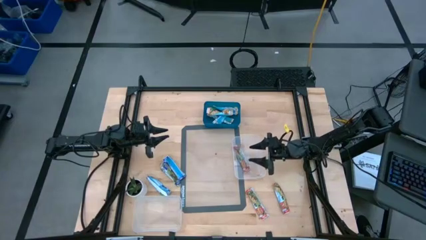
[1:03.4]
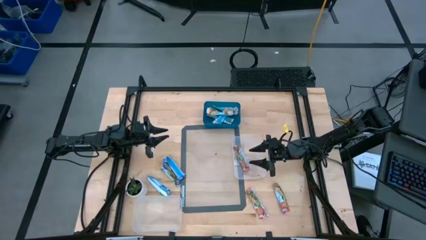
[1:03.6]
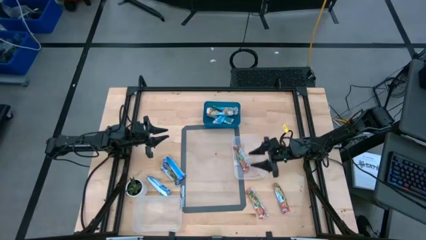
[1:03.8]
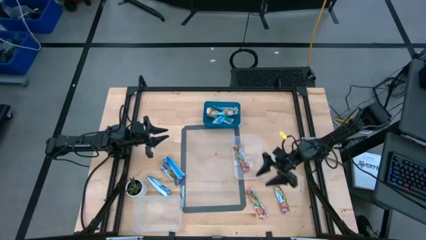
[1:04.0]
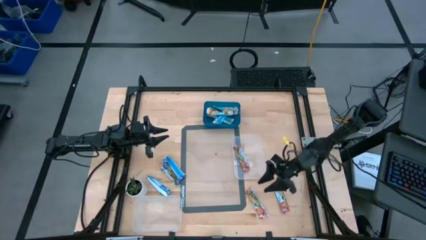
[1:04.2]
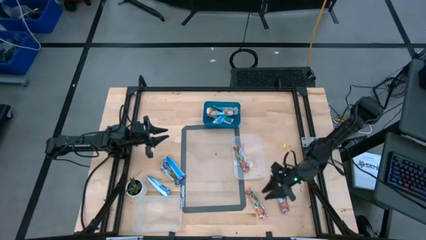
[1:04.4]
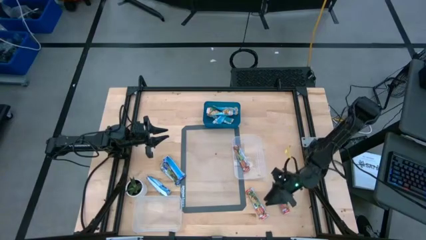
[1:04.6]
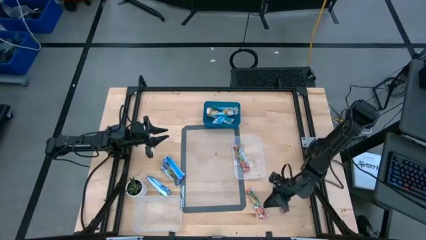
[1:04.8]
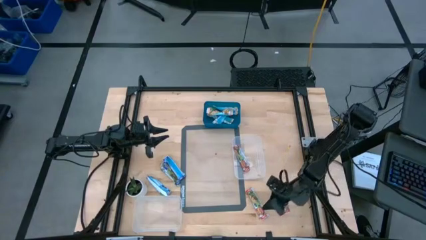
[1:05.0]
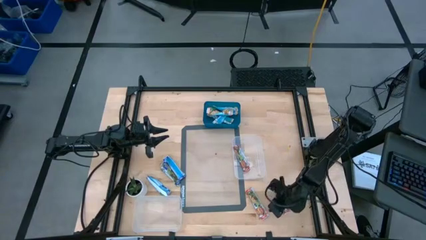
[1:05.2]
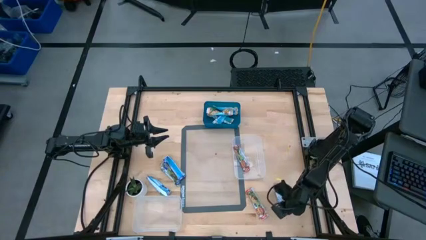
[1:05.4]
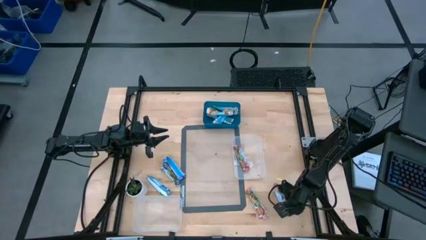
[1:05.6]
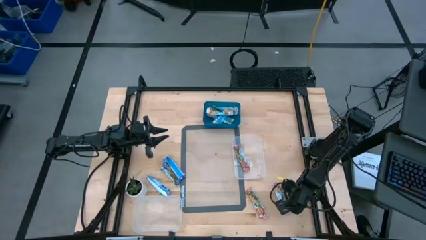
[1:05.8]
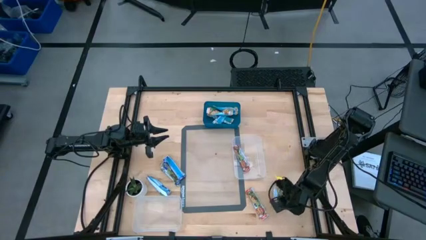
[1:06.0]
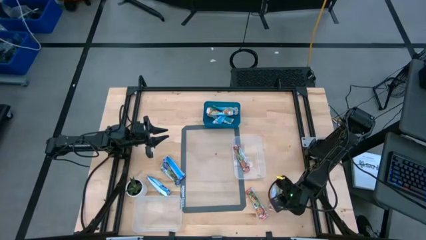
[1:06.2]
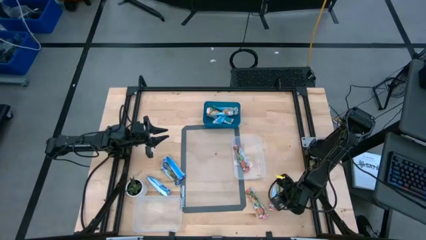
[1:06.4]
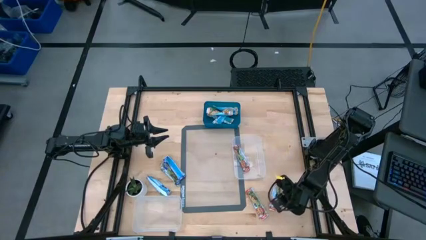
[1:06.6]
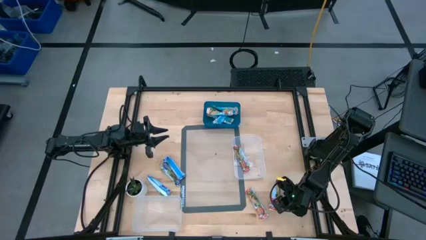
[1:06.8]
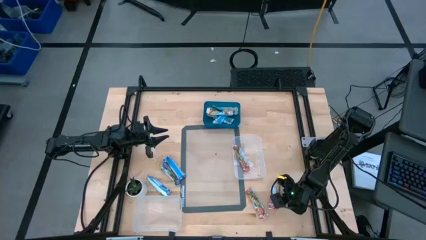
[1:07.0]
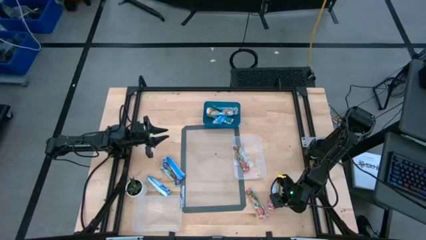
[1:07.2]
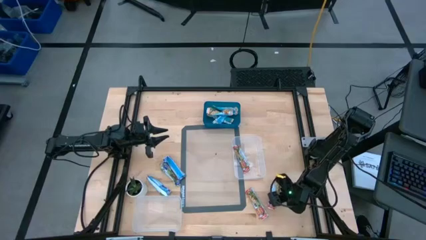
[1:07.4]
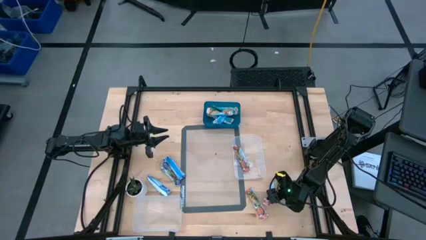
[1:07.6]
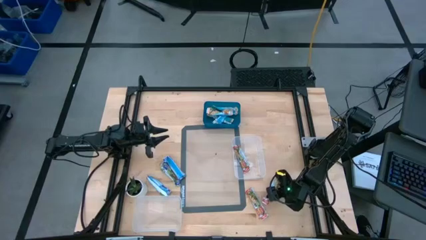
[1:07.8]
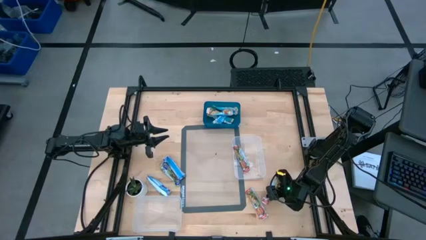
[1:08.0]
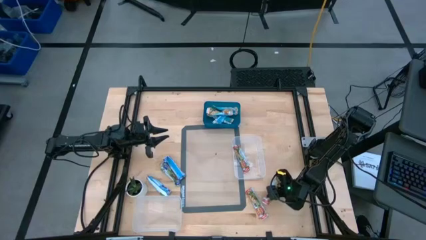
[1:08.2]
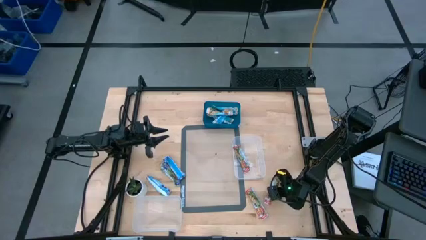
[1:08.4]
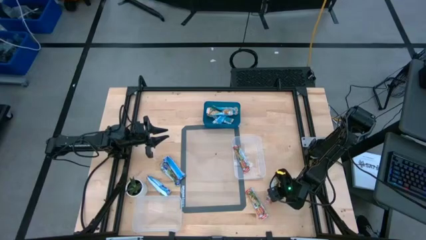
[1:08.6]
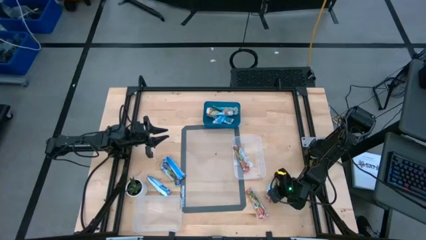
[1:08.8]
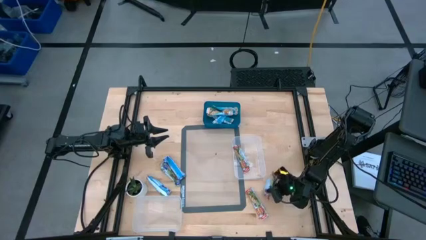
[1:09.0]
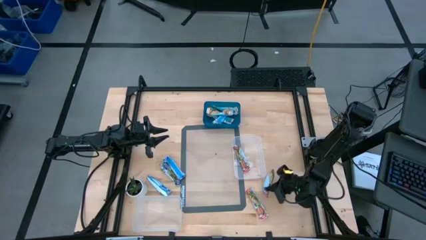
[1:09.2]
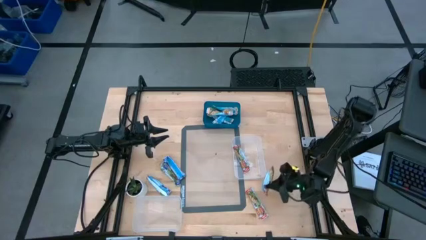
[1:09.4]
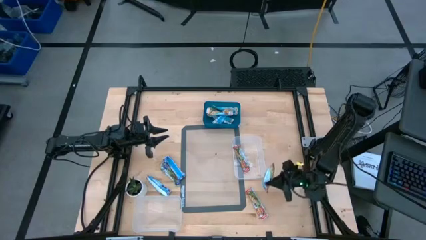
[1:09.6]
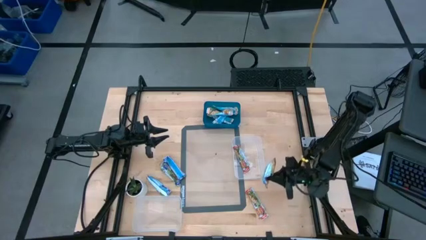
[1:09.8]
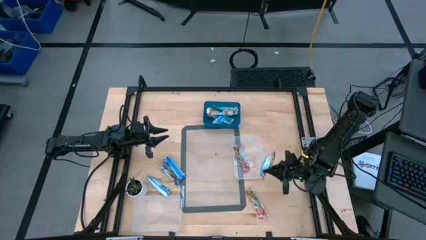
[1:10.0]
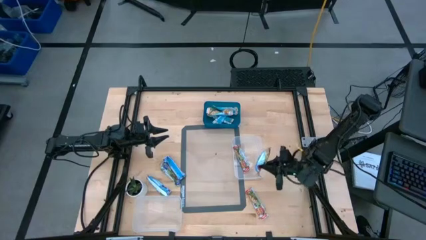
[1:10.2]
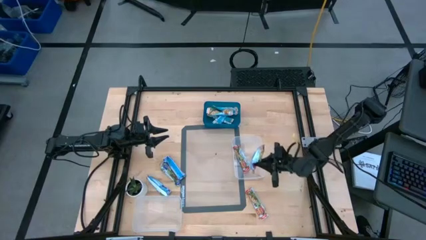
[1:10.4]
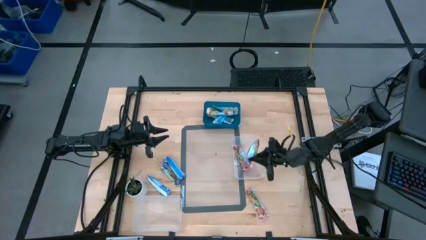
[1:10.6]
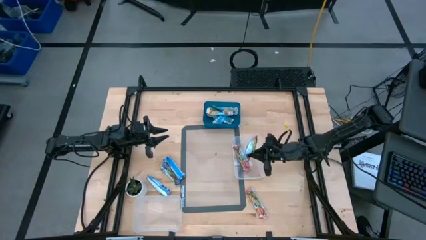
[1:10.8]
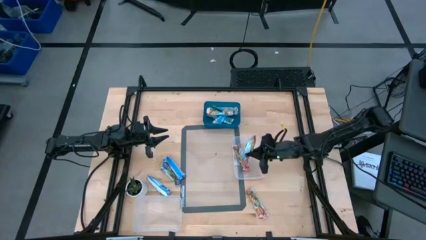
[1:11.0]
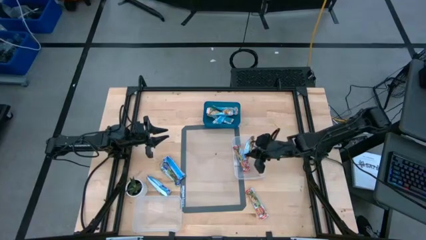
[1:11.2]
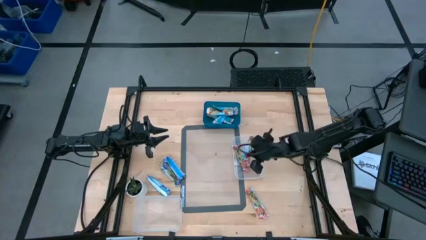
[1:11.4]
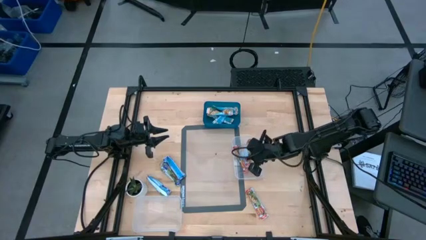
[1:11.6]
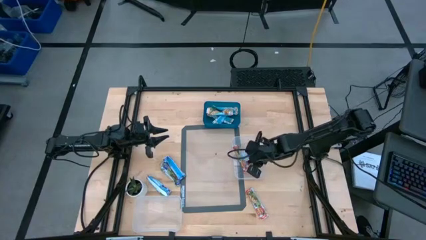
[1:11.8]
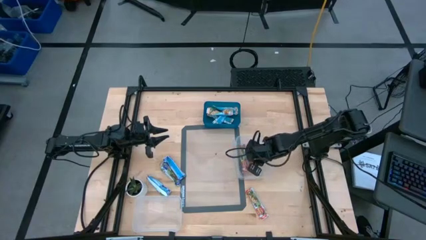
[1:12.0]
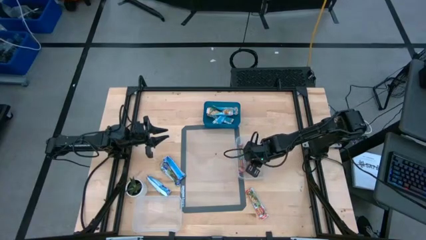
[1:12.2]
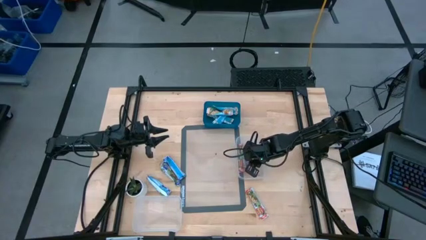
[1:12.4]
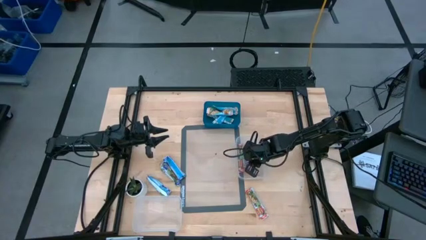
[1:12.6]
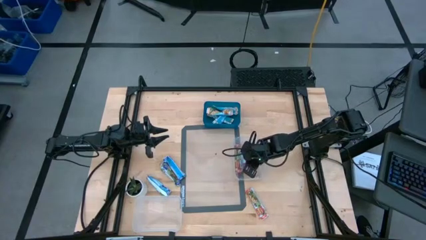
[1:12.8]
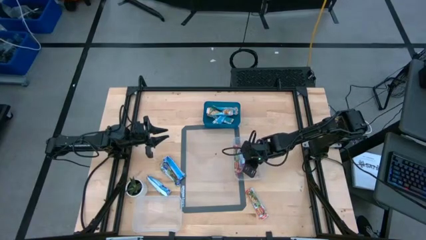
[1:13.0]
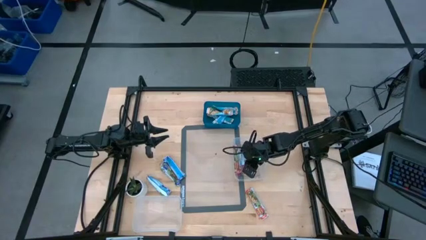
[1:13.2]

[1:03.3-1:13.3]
Task: Pick and place Granola Bars by type
Put the red granola bar into the right transparent bin

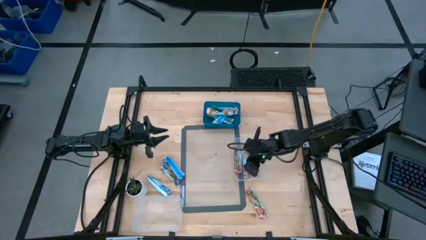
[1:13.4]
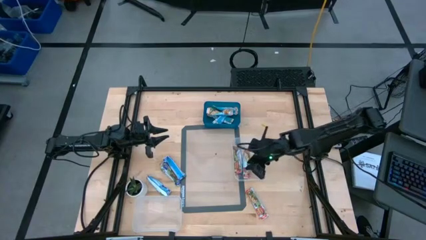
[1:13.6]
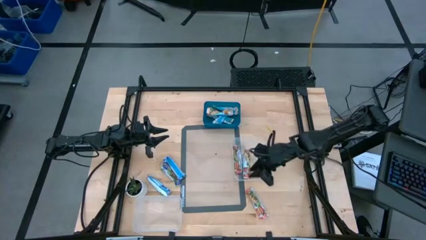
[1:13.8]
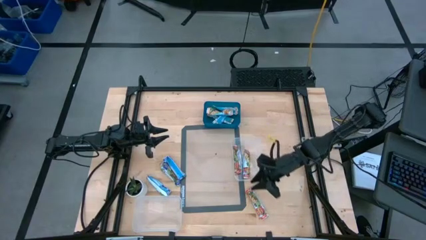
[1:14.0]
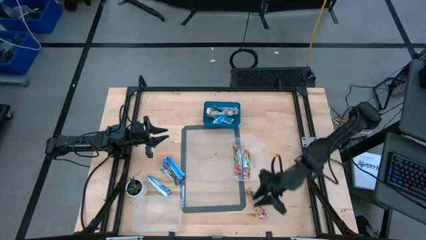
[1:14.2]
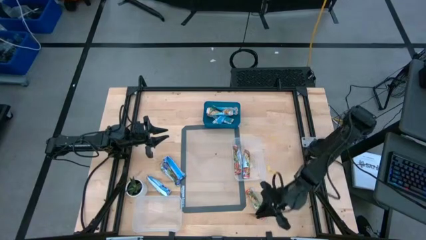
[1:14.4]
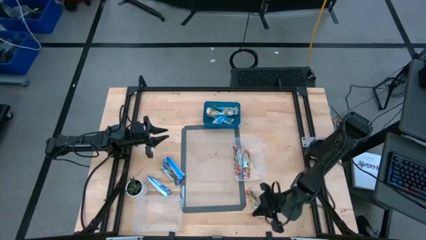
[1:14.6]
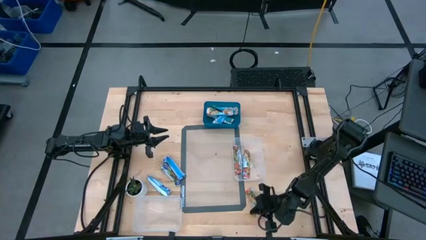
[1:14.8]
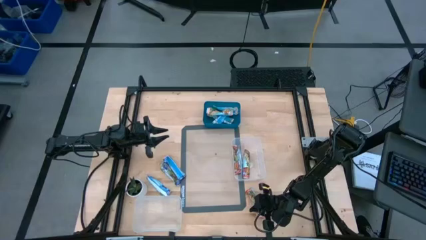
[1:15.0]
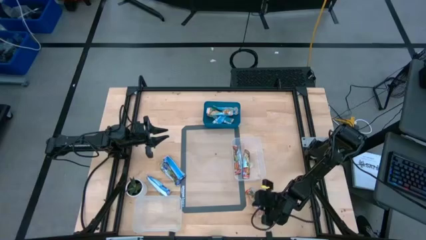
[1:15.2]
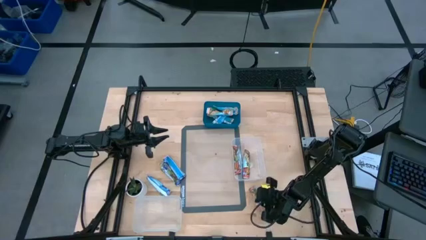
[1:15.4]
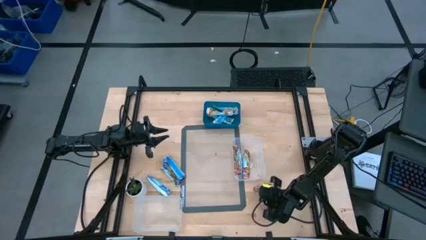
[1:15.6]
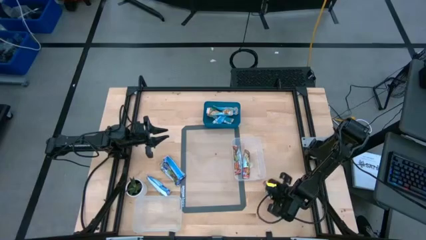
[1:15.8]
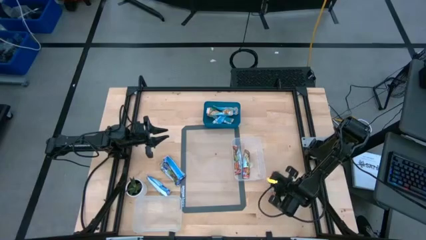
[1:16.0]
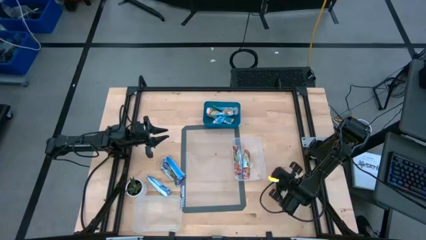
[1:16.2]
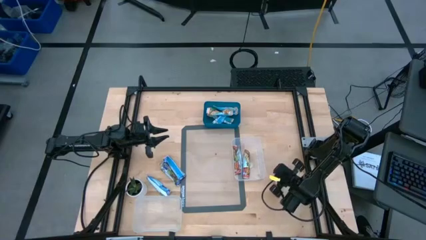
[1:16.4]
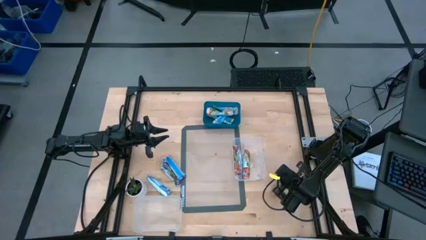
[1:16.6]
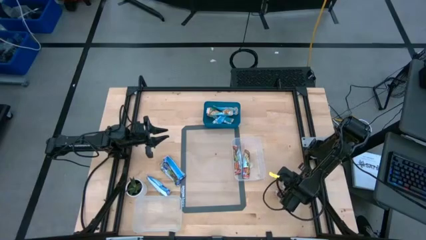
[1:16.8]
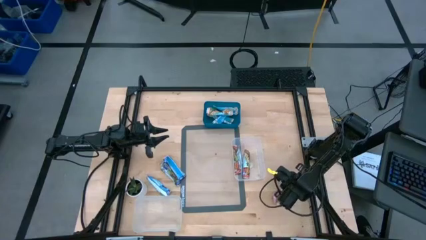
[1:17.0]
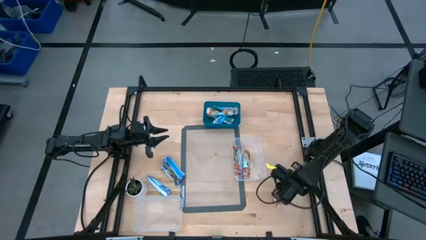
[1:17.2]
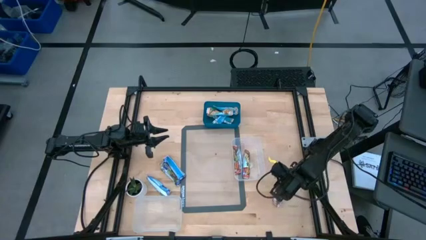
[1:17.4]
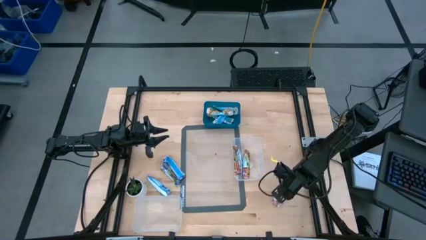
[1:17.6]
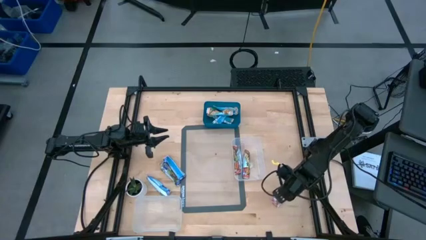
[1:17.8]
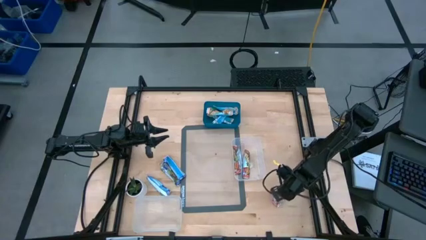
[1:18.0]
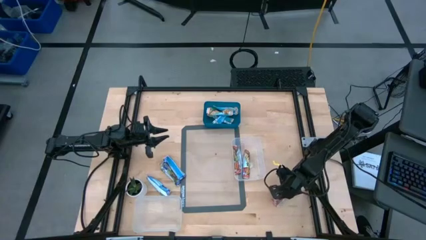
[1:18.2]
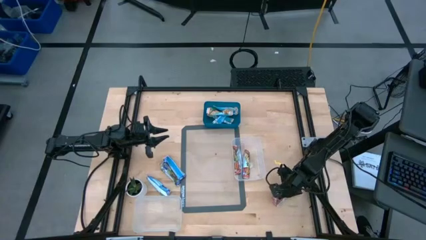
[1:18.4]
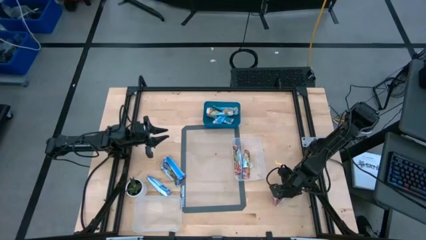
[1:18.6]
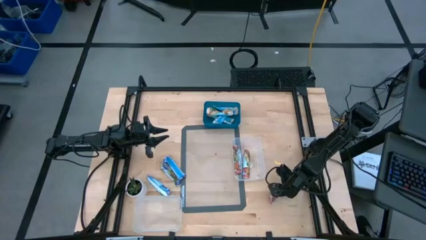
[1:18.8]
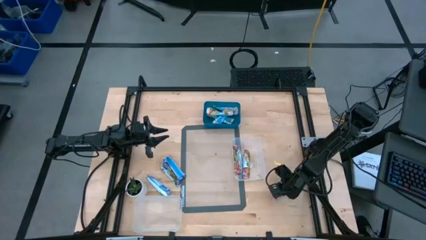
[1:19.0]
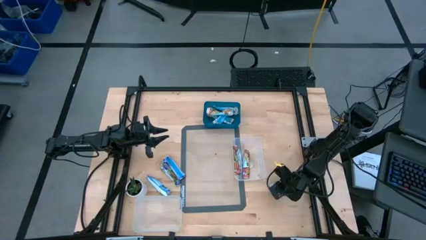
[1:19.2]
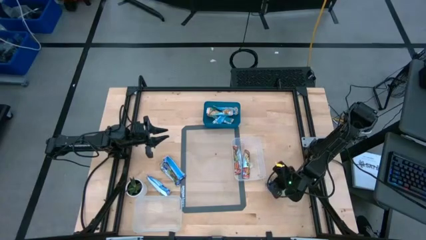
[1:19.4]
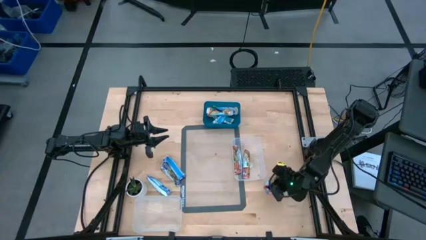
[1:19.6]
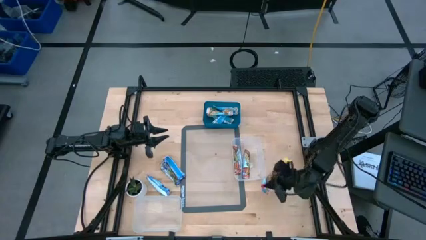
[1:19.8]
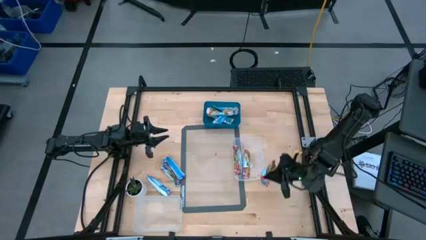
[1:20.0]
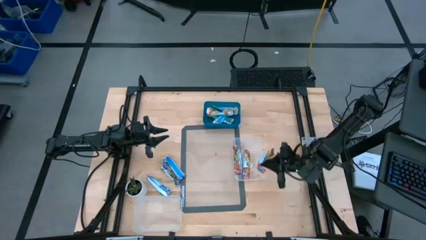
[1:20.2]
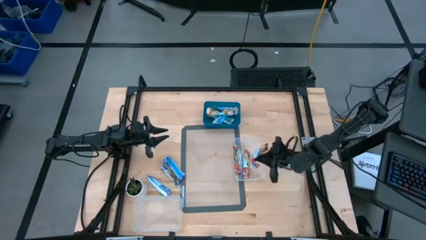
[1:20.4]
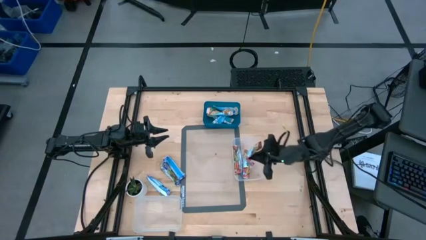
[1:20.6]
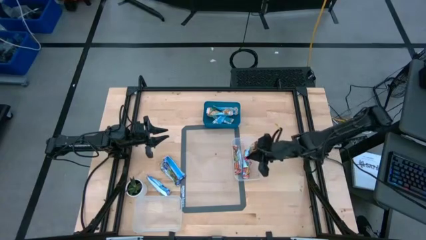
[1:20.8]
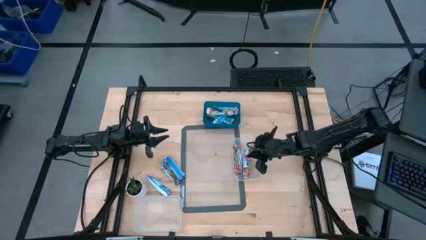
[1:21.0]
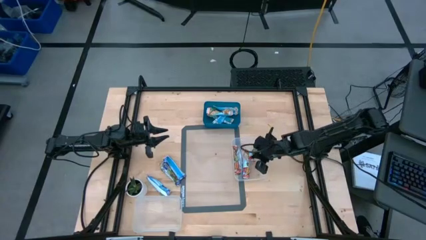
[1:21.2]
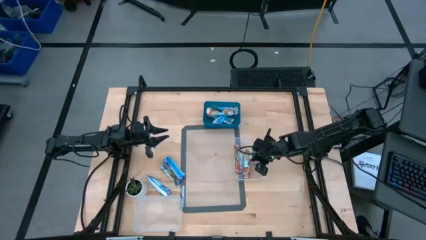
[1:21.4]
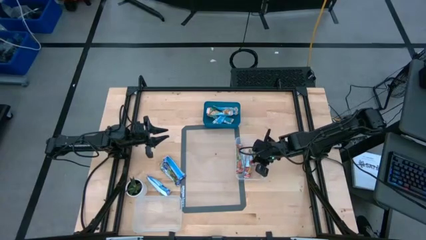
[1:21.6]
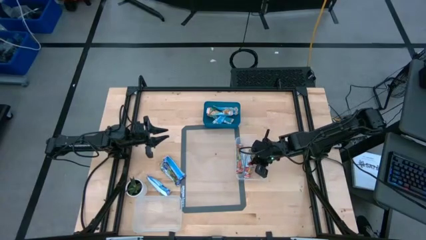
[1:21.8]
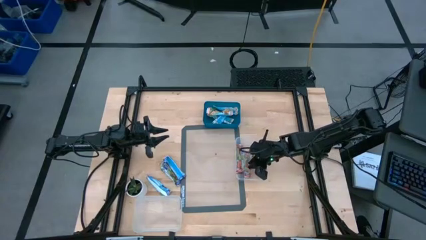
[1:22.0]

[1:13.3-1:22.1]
Put the red granola bar into the right transparent bin
